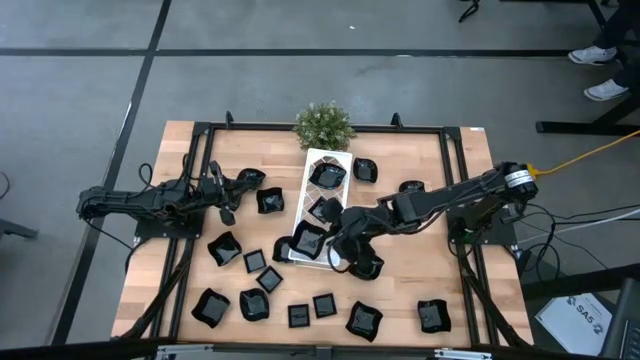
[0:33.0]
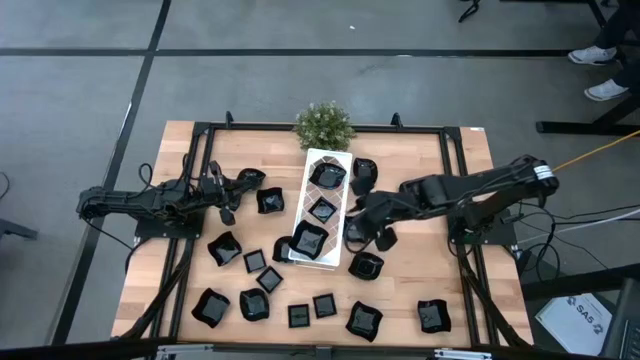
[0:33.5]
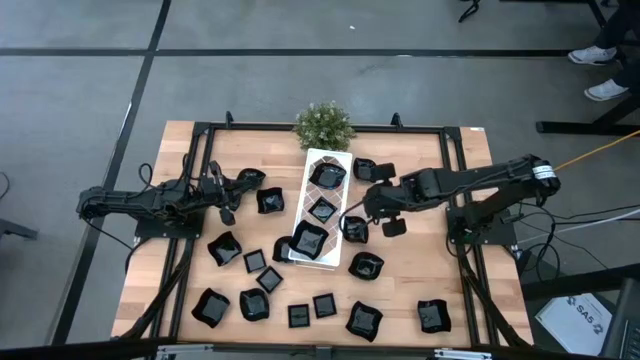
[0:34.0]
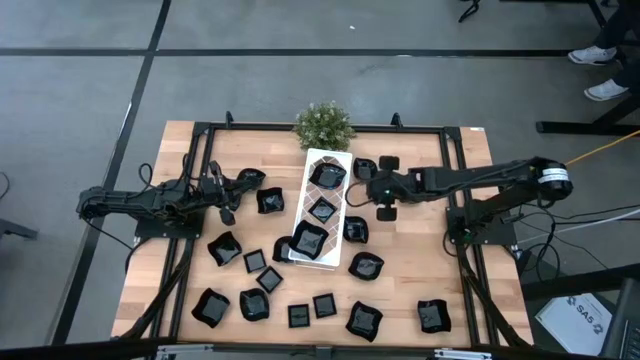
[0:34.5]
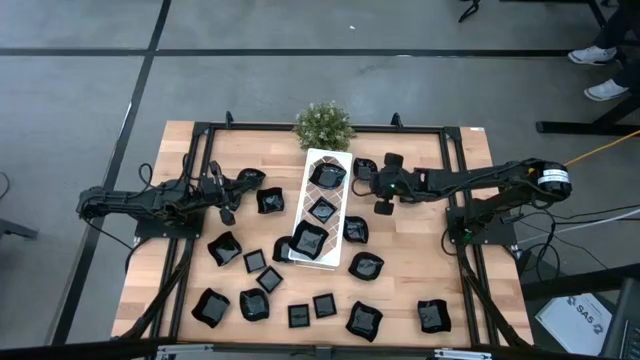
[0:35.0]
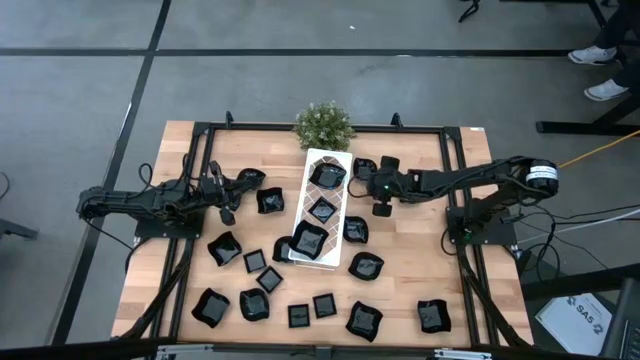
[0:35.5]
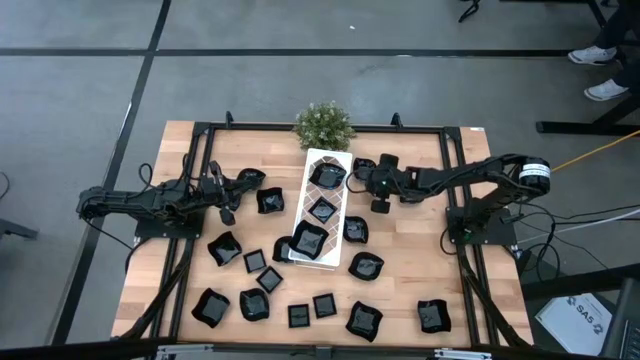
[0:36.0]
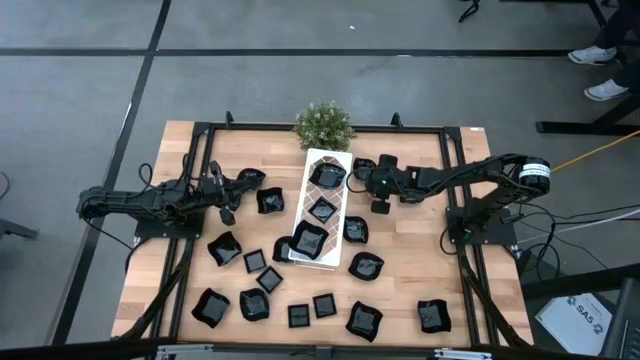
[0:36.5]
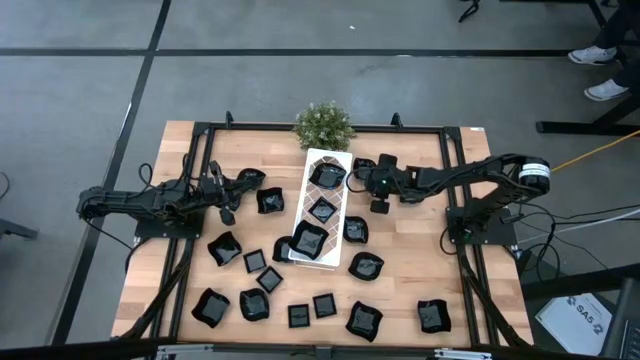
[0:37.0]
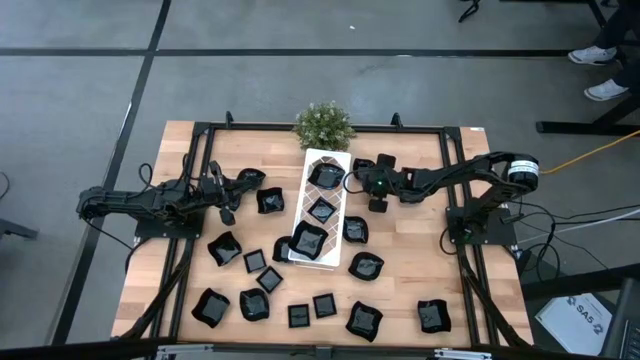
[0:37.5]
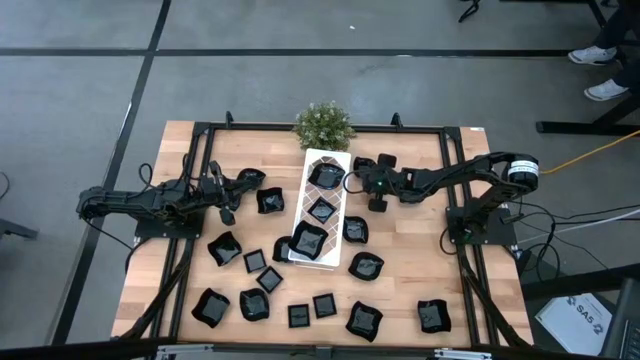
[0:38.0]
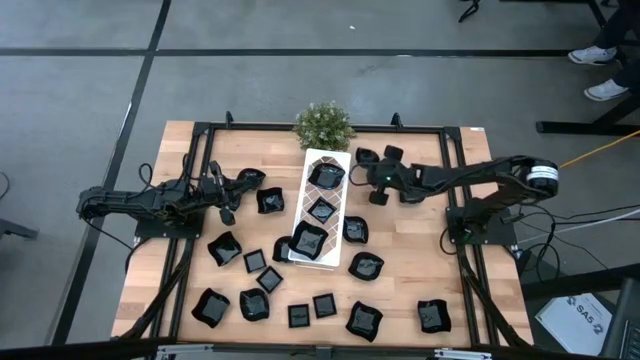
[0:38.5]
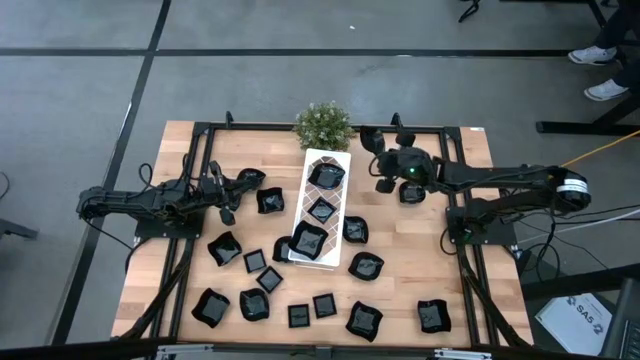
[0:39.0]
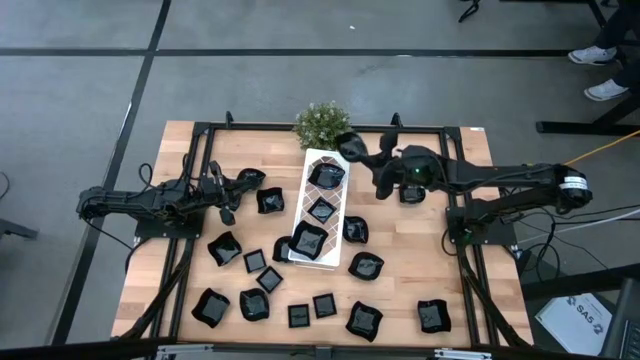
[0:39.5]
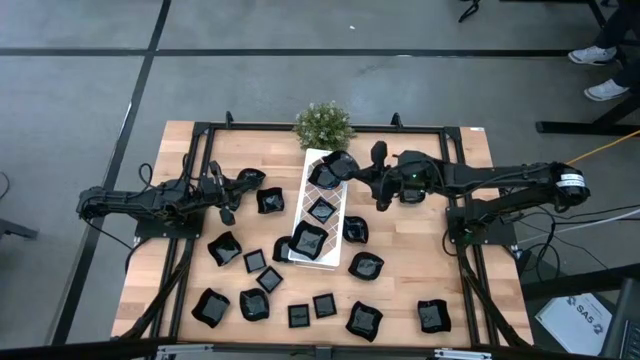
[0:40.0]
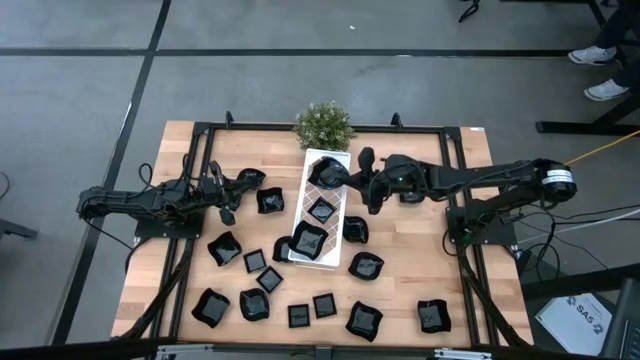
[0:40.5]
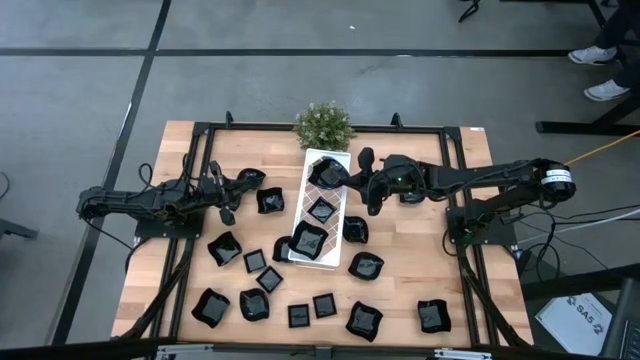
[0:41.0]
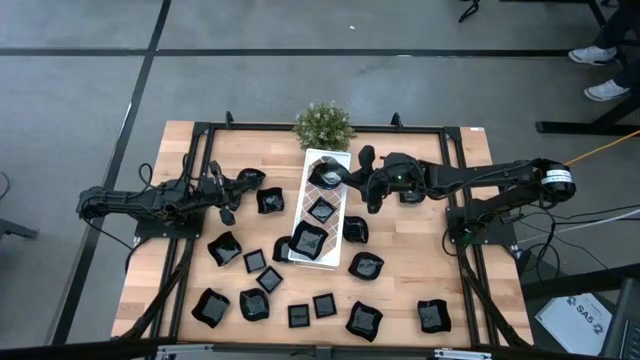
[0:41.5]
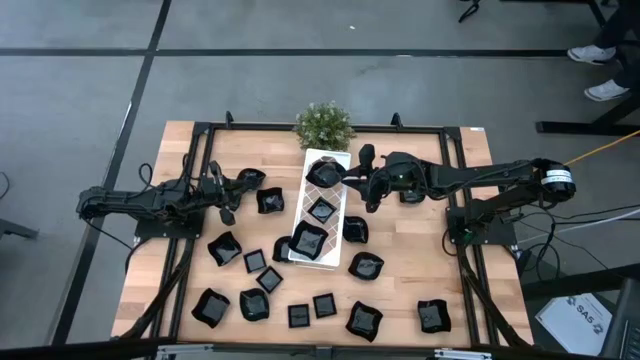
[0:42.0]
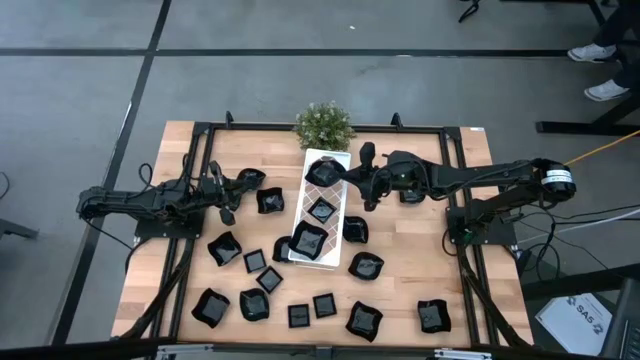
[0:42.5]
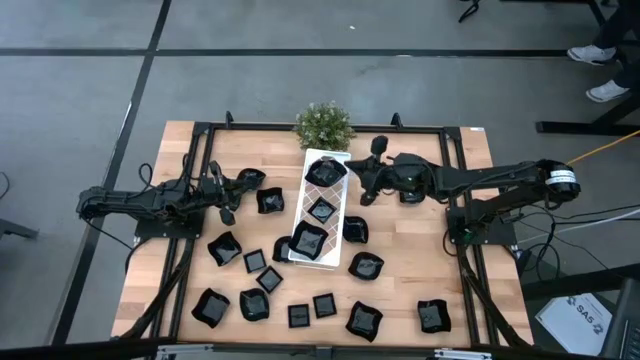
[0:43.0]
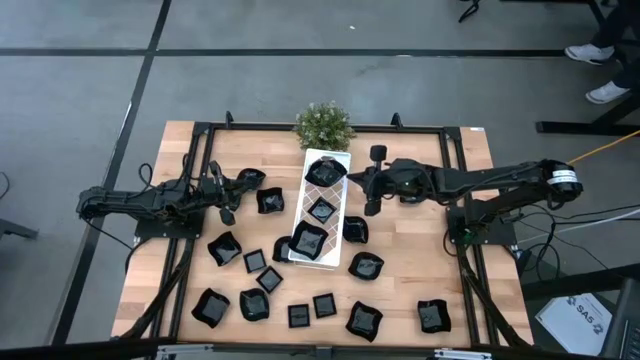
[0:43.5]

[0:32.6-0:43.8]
Task: Pick & Place Mini shaped plates
Stack the leaf shaped plate on top of the leaf shaped plate on the shelf

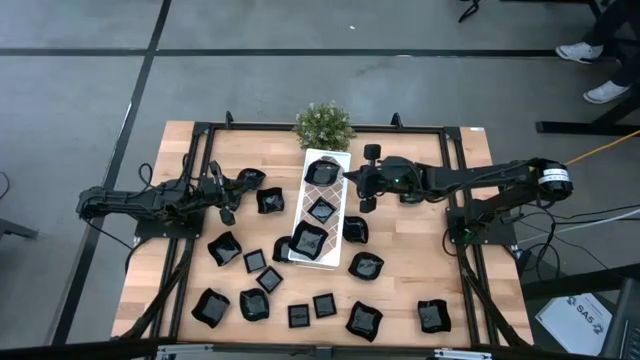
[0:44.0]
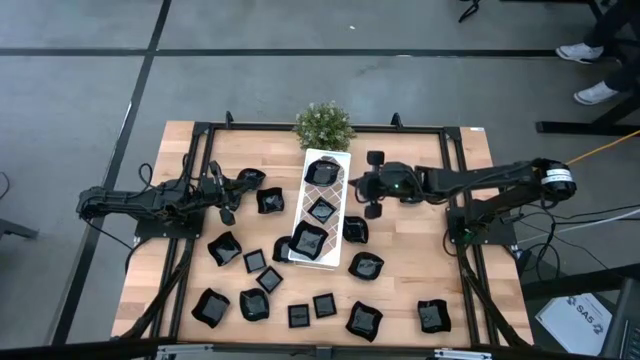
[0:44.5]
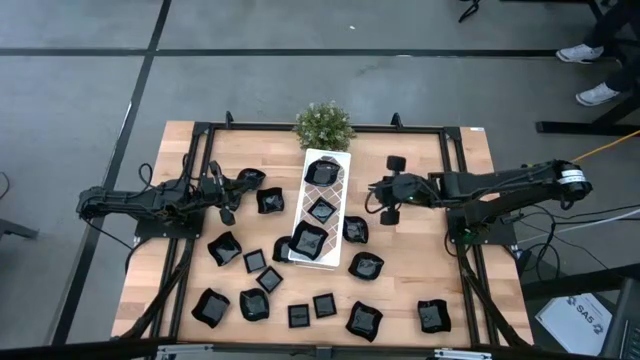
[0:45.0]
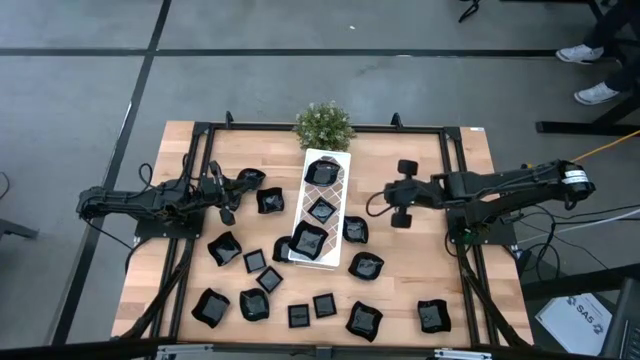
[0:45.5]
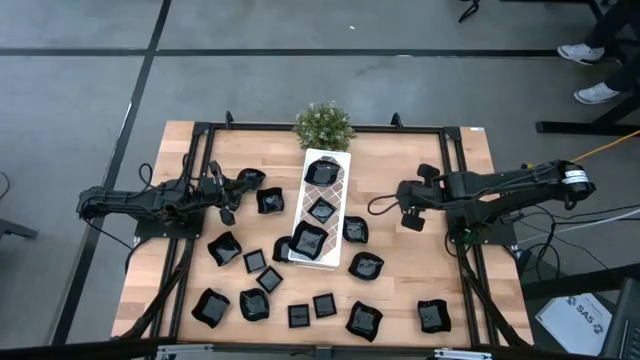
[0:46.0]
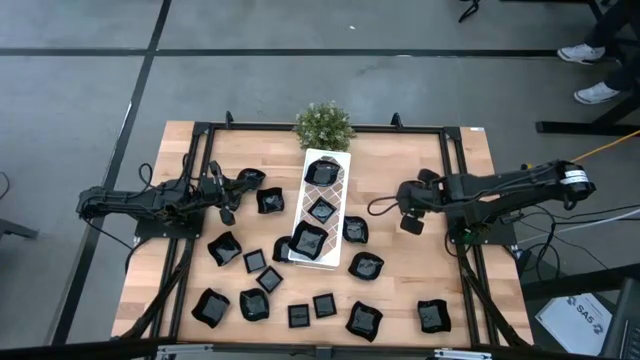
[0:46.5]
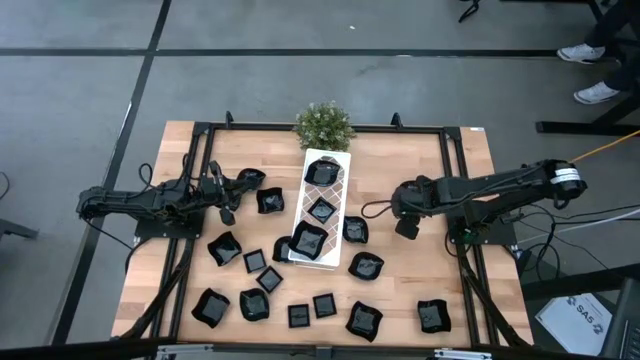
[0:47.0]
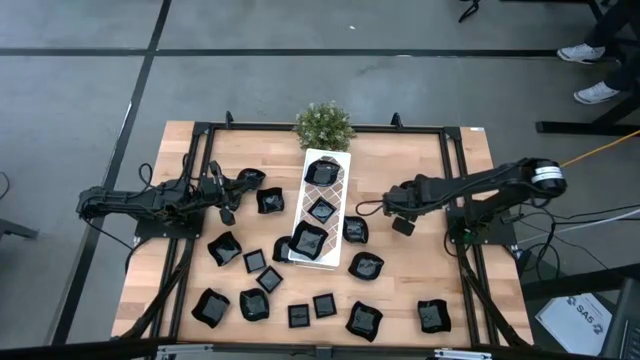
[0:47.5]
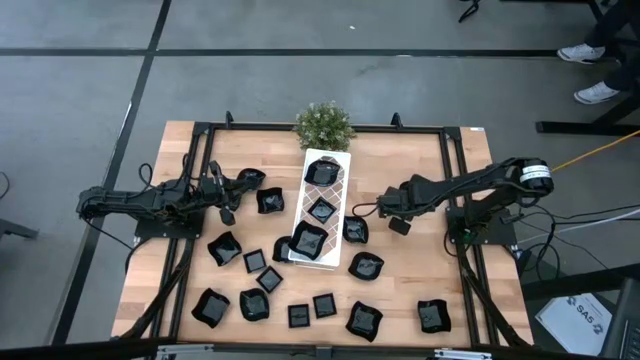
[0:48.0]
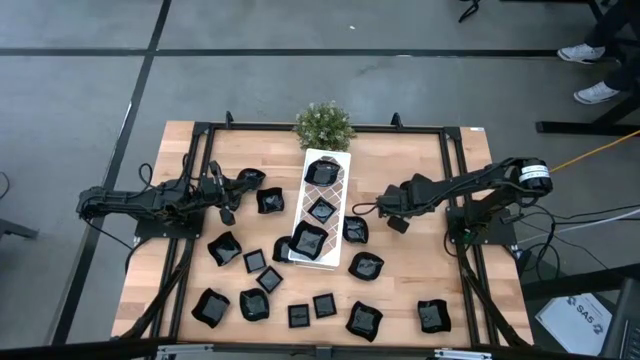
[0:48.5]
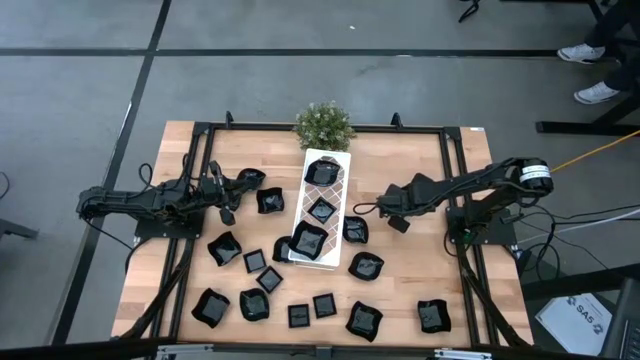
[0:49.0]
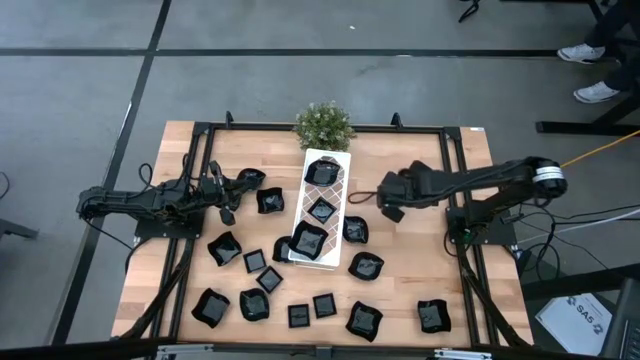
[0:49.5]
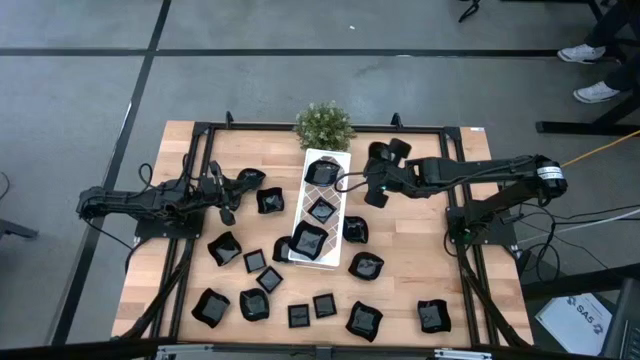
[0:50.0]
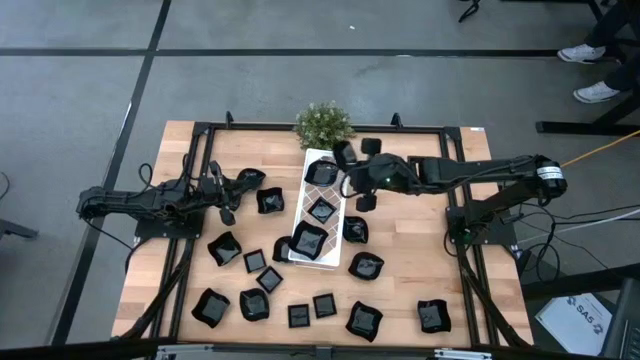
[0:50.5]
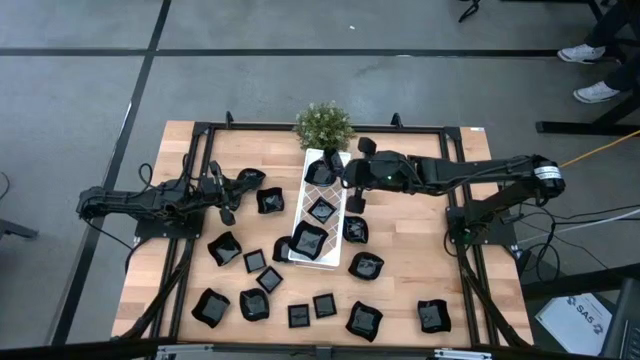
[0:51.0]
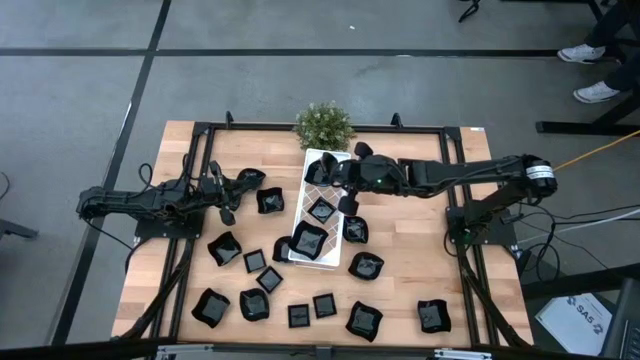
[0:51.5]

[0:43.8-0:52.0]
Stack the leaf shaped plate on top of the leaf shaped plate on the shelf
